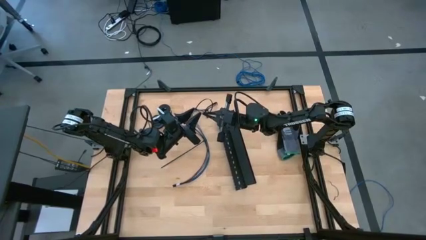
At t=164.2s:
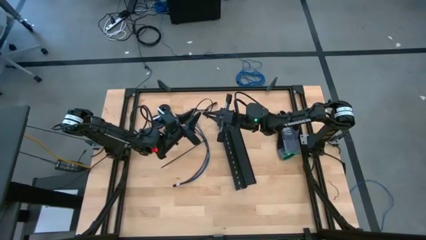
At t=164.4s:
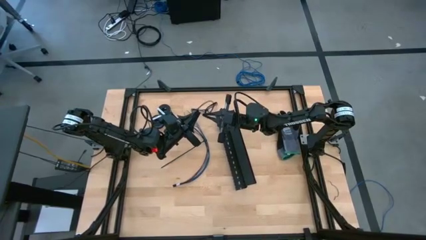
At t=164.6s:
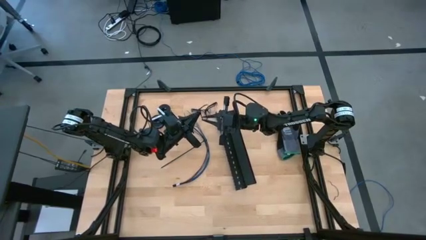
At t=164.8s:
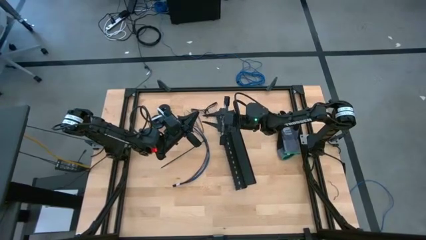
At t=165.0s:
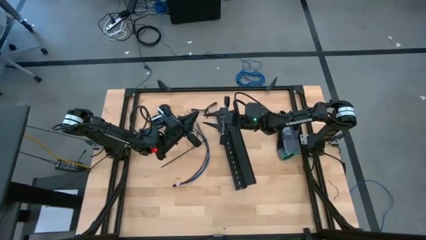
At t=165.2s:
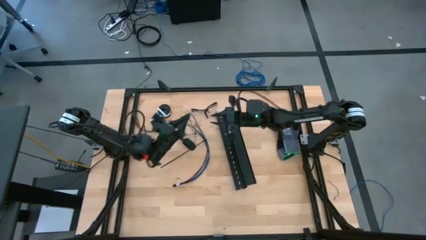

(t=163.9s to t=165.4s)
Task: Ziptie cables
Wrap the black zip tie on the cable

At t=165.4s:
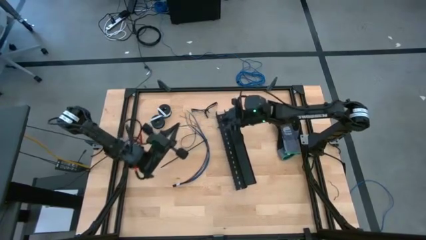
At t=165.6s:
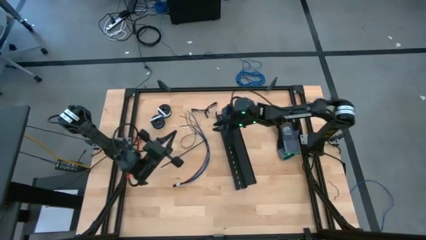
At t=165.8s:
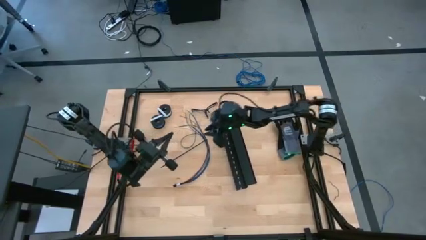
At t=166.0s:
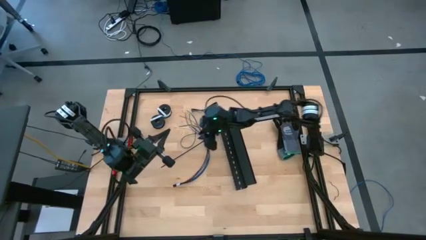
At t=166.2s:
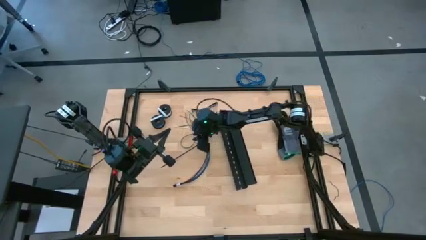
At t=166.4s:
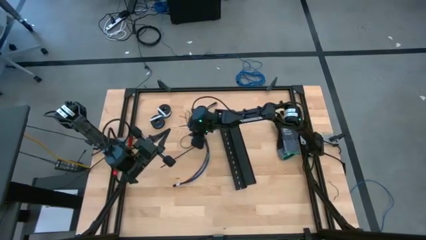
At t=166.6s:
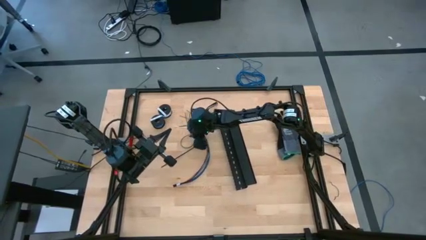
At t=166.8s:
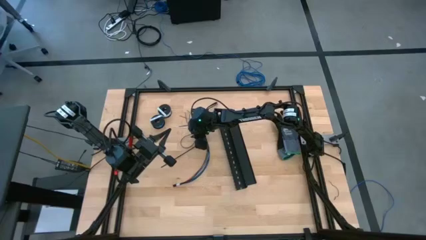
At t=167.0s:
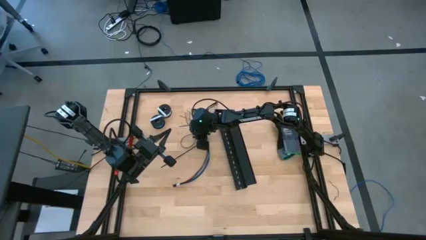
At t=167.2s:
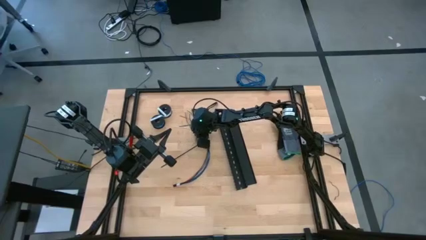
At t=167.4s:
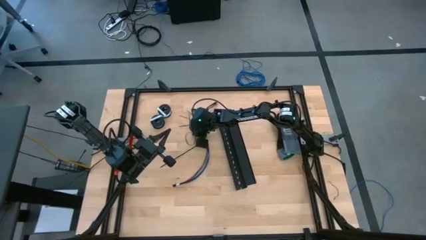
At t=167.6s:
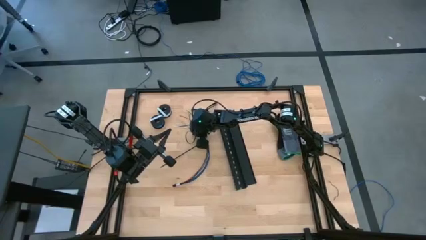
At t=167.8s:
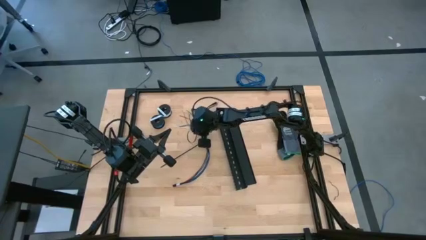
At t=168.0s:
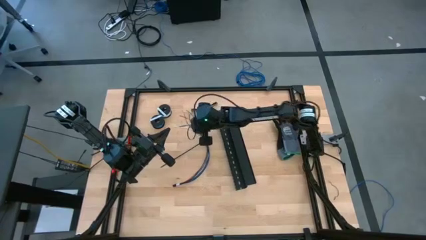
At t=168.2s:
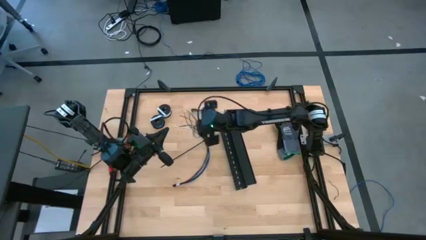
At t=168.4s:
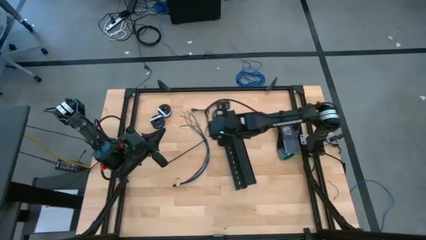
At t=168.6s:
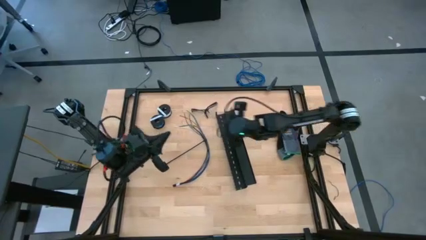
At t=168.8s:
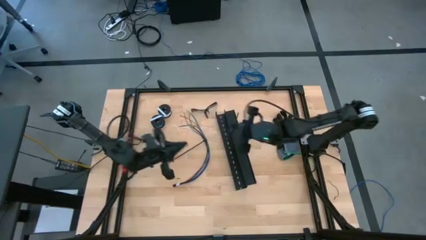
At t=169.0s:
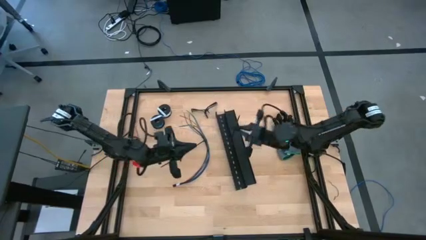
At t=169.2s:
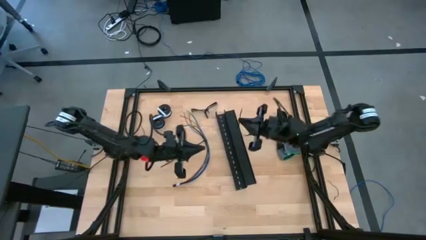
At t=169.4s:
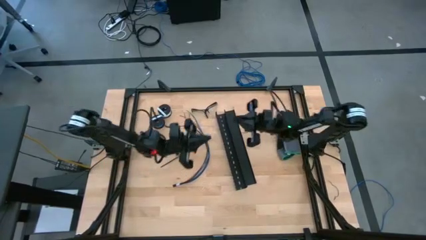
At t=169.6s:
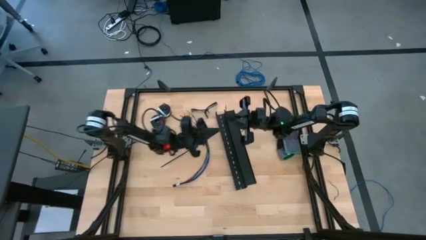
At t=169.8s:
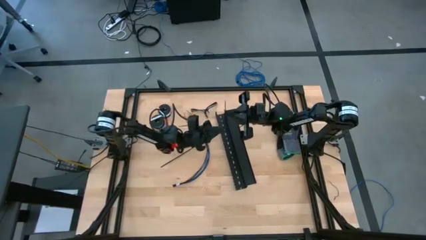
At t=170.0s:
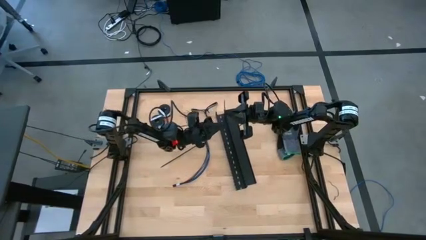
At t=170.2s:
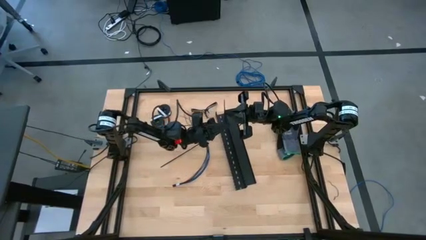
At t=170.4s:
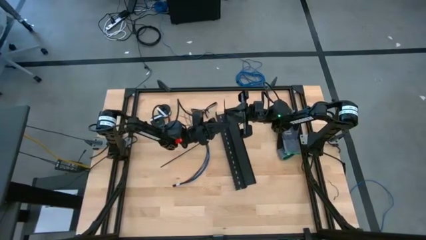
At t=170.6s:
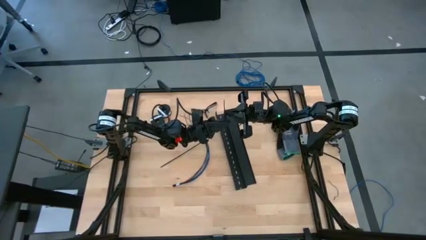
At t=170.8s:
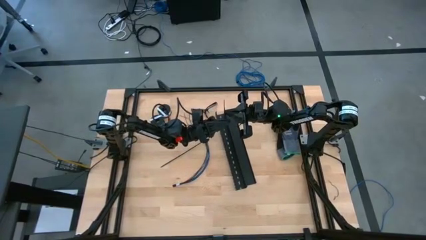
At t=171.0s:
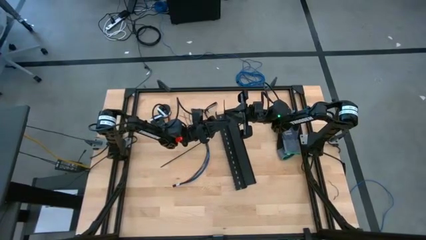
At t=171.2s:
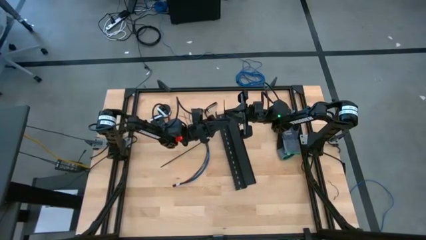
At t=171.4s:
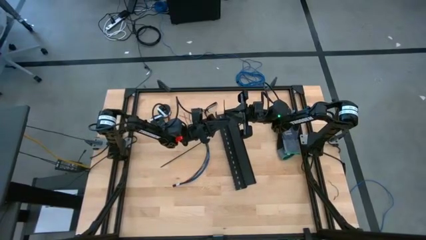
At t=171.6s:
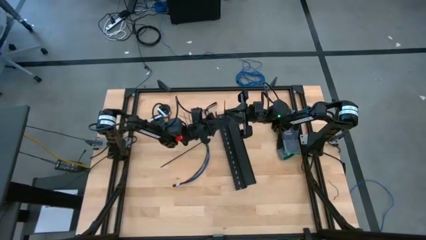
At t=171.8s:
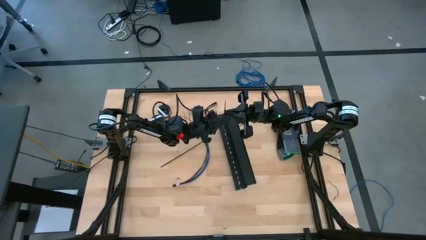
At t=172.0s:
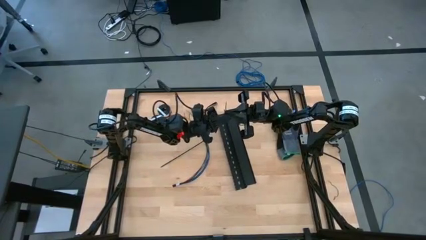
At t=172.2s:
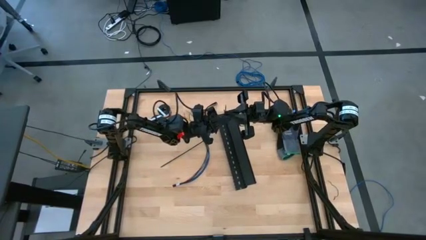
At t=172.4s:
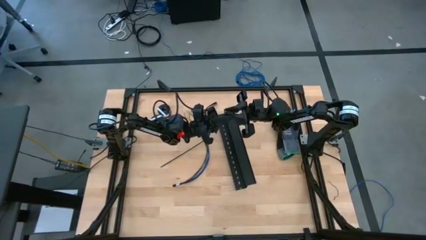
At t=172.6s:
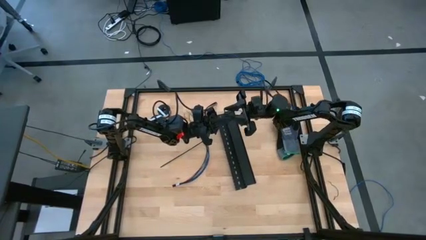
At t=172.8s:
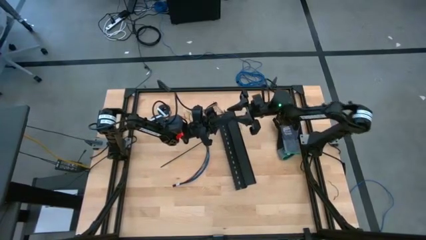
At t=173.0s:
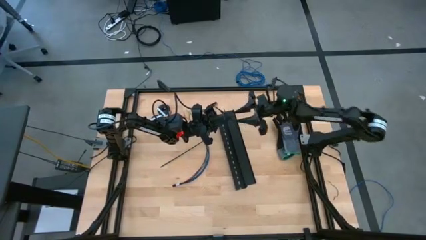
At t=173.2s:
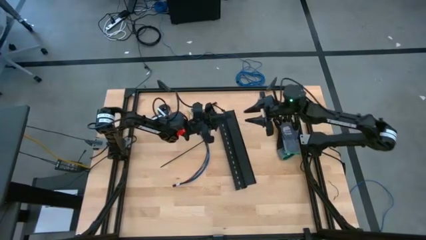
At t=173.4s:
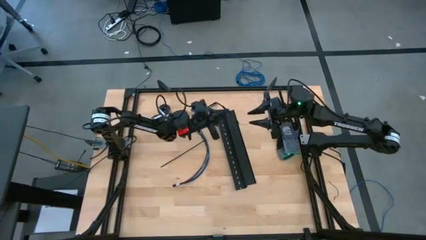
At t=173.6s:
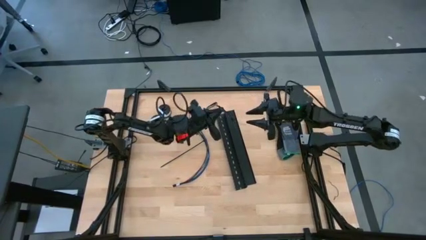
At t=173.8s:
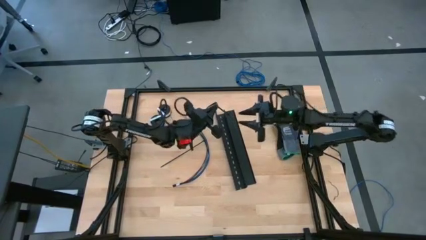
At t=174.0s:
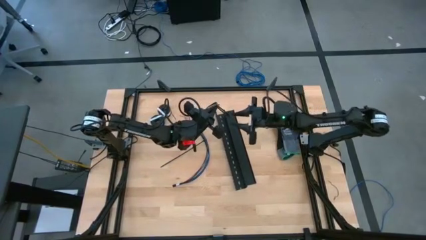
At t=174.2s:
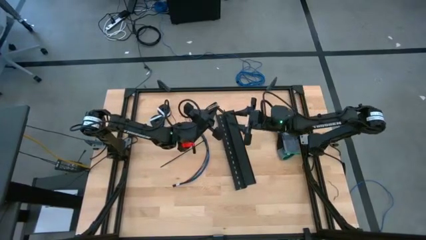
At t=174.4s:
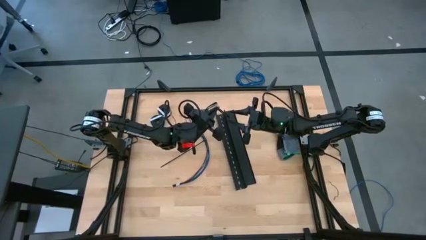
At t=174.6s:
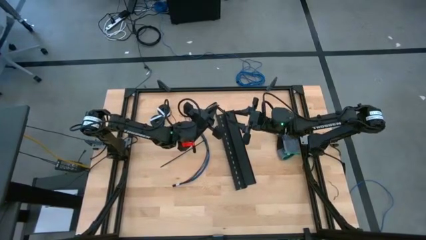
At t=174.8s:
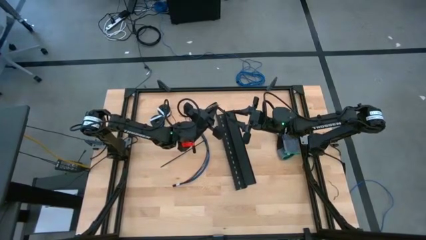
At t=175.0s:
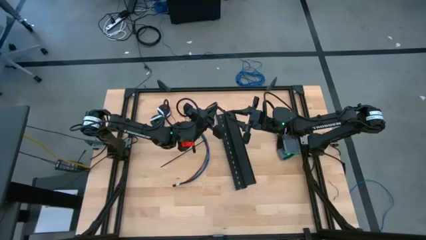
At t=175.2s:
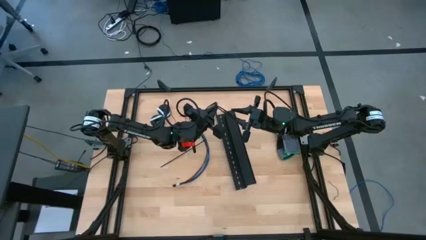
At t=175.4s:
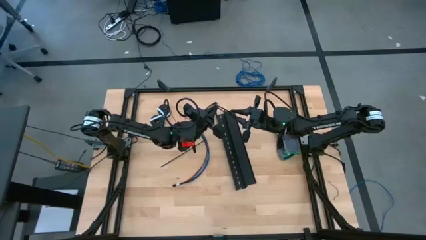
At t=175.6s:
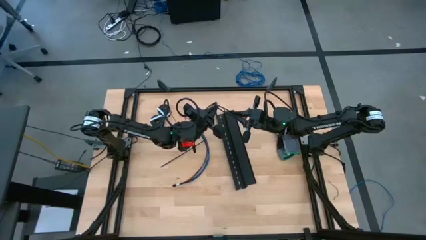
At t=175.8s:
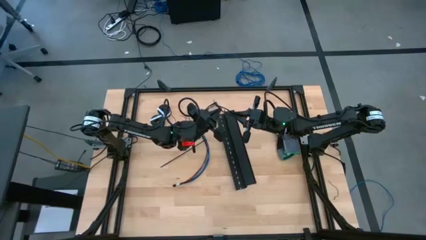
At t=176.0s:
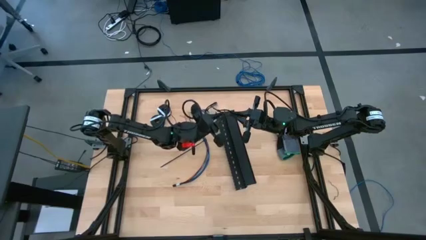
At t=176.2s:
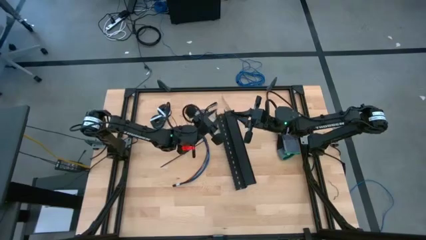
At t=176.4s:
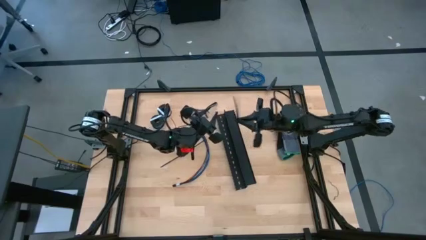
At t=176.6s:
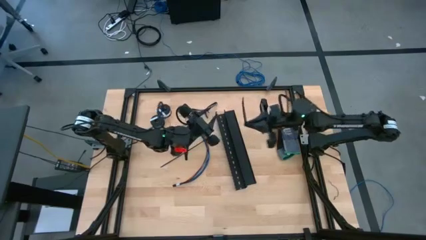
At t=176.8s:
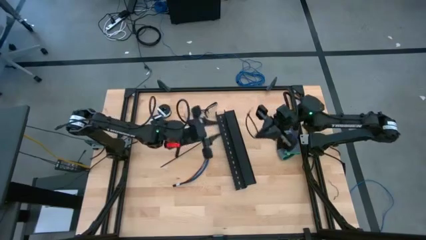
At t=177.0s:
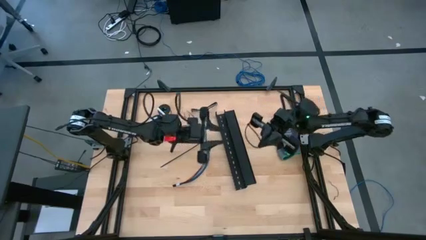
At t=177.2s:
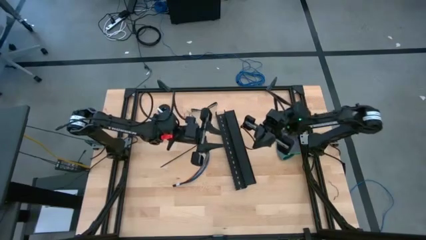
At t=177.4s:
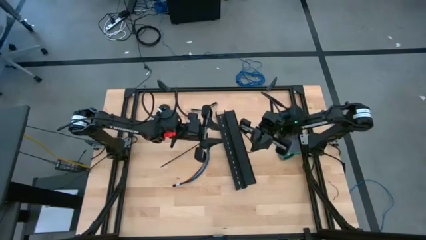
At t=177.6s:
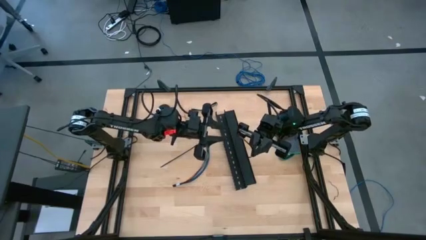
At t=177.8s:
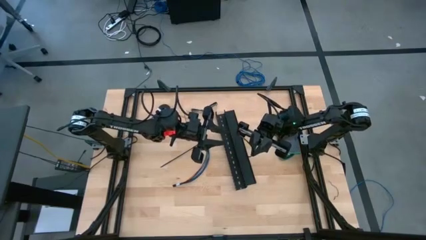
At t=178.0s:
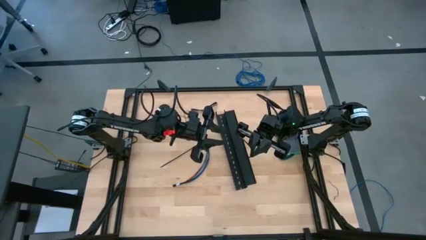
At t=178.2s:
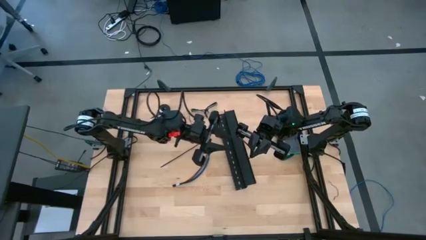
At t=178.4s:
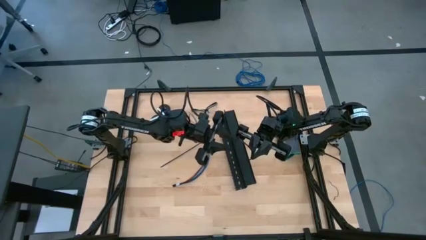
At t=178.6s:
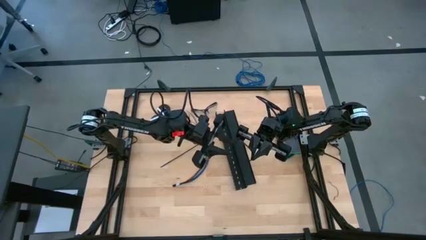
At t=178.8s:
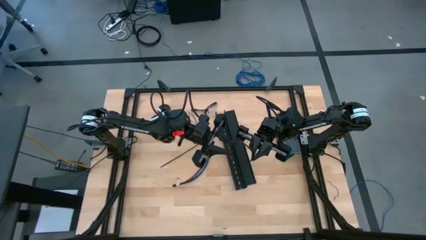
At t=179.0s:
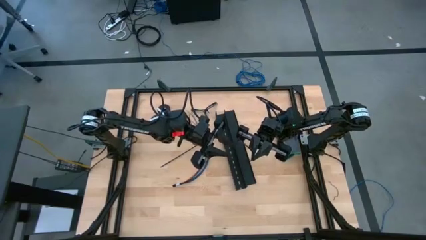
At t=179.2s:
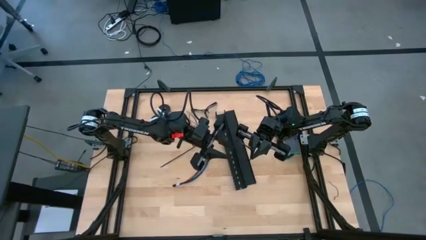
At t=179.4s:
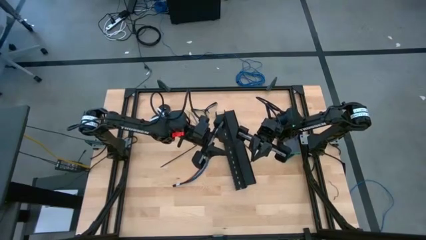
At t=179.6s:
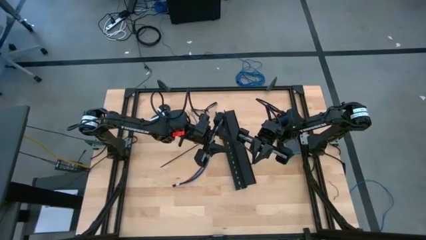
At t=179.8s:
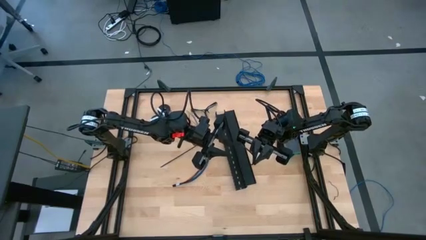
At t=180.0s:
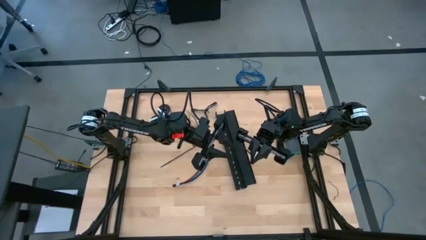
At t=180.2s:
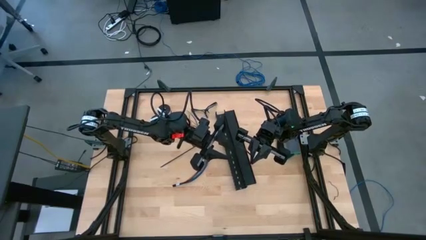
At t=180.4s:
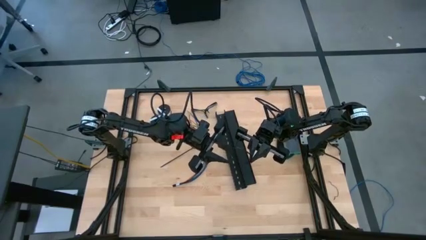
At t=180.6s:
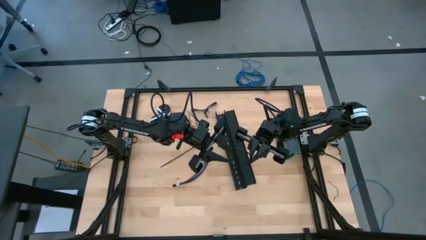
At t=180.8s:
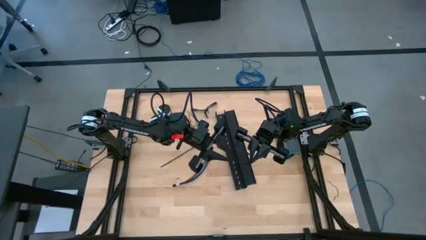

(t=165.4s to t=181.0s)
Wrap the black zip tie on the cable
